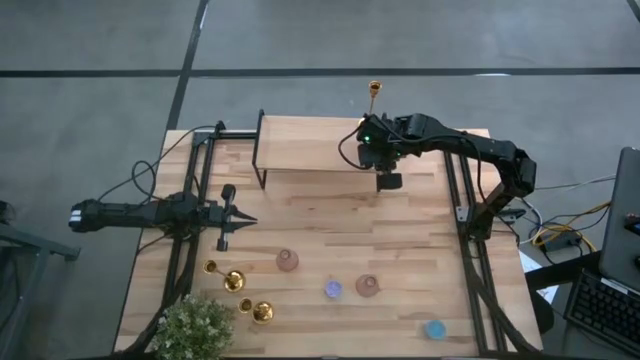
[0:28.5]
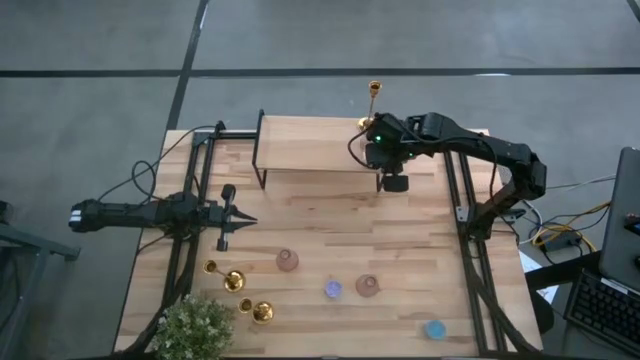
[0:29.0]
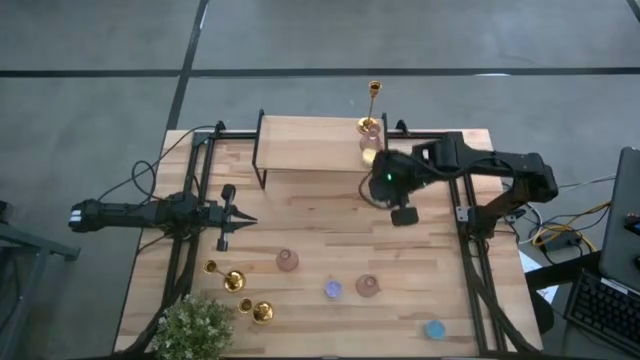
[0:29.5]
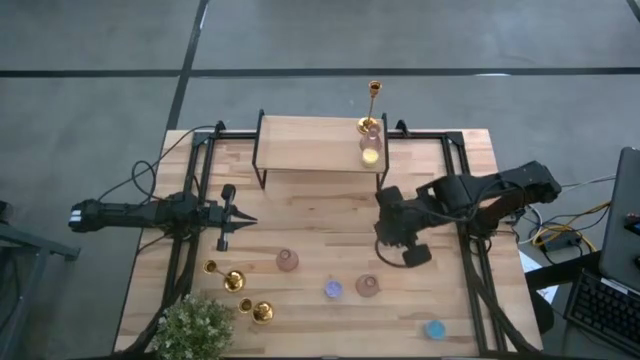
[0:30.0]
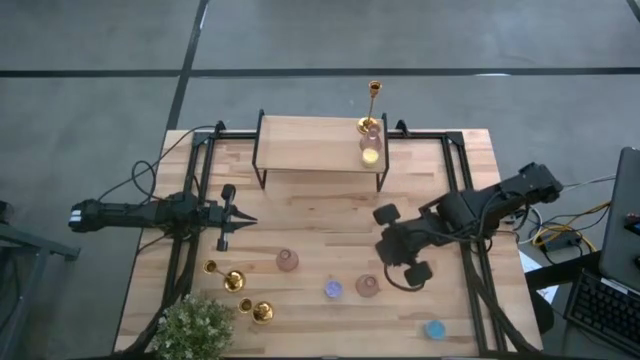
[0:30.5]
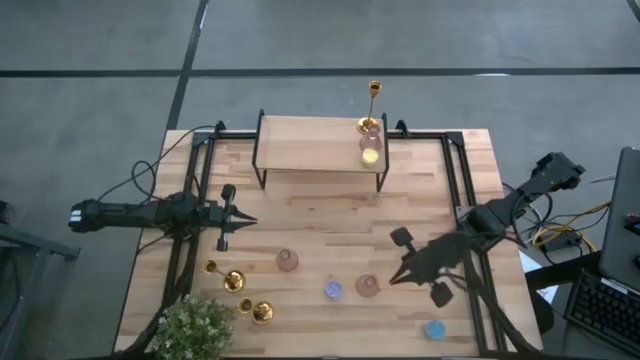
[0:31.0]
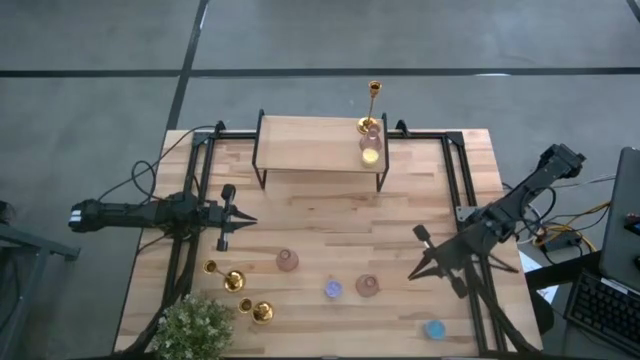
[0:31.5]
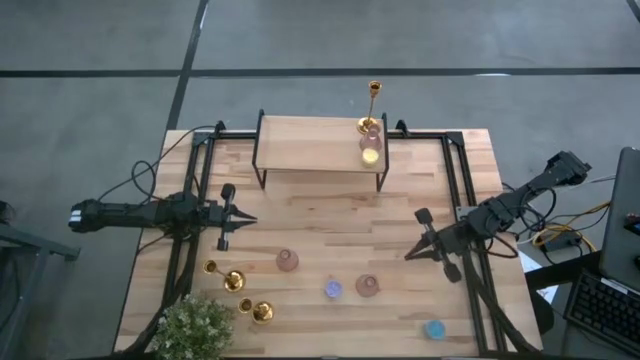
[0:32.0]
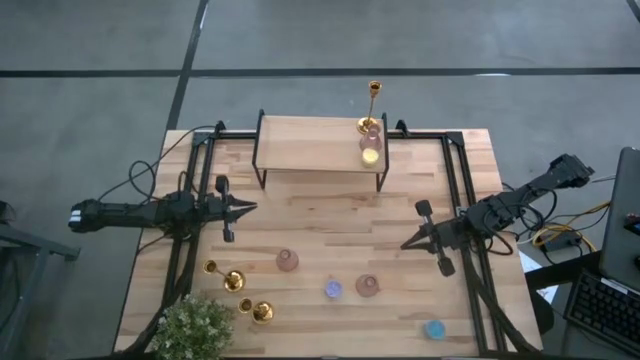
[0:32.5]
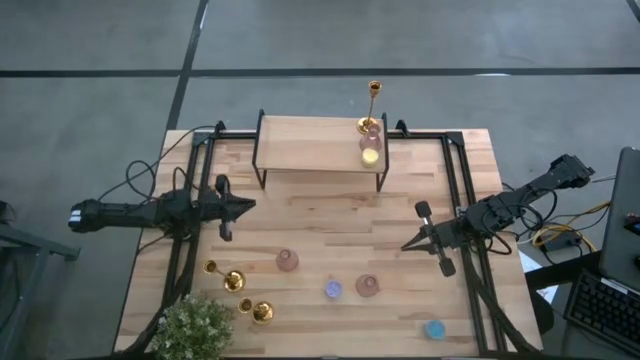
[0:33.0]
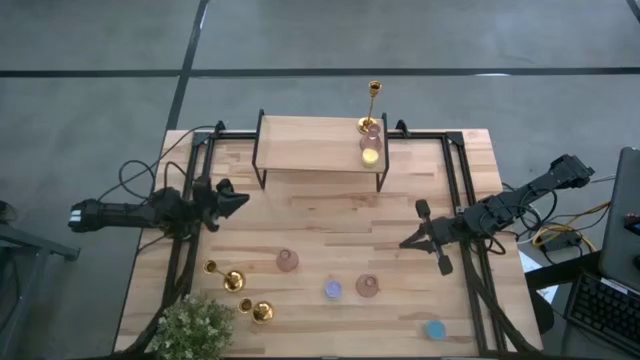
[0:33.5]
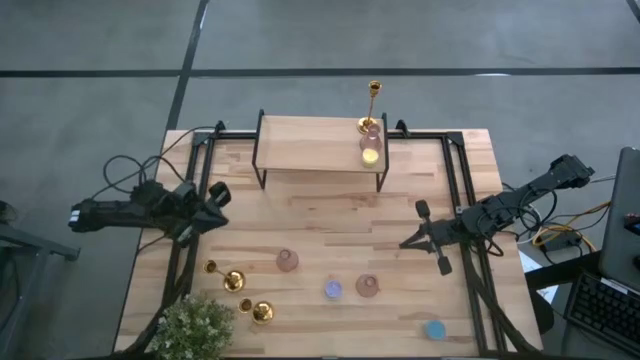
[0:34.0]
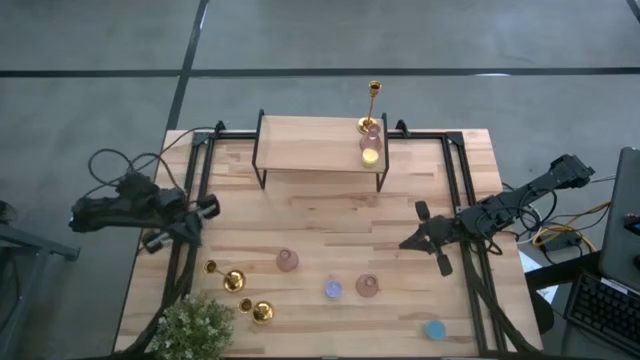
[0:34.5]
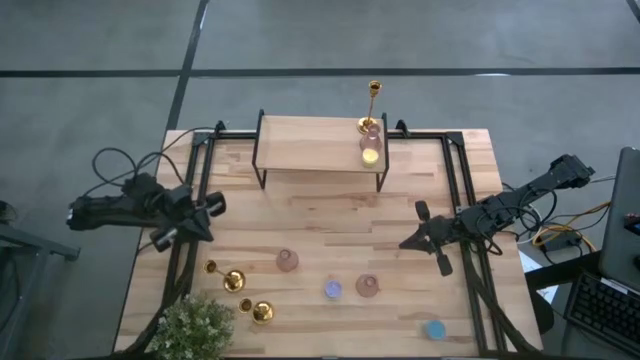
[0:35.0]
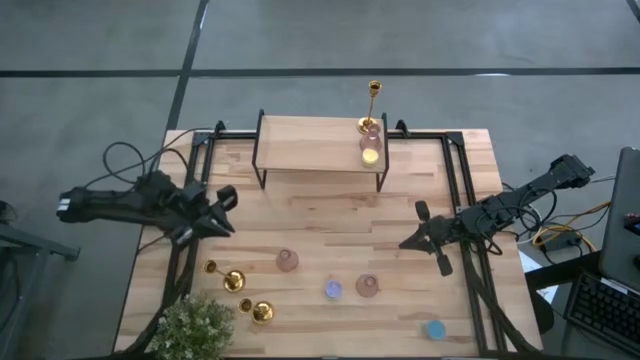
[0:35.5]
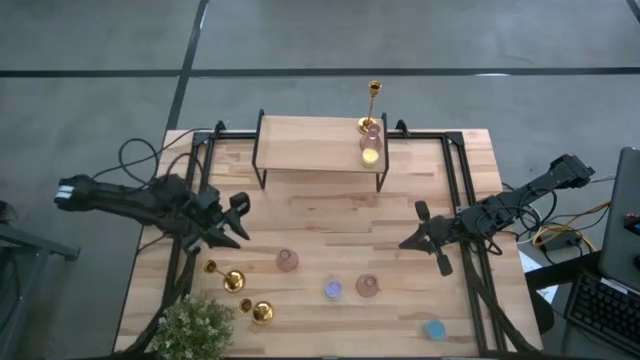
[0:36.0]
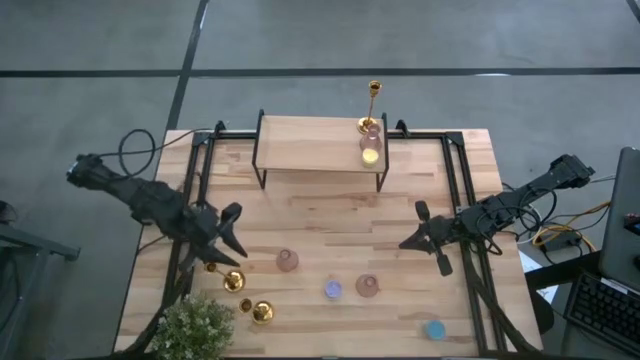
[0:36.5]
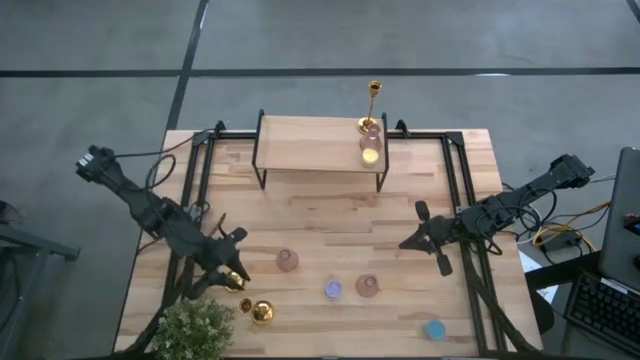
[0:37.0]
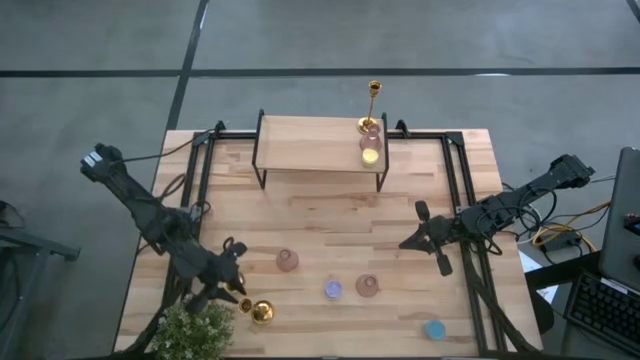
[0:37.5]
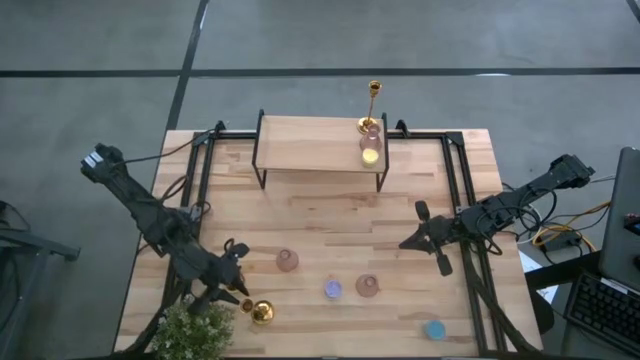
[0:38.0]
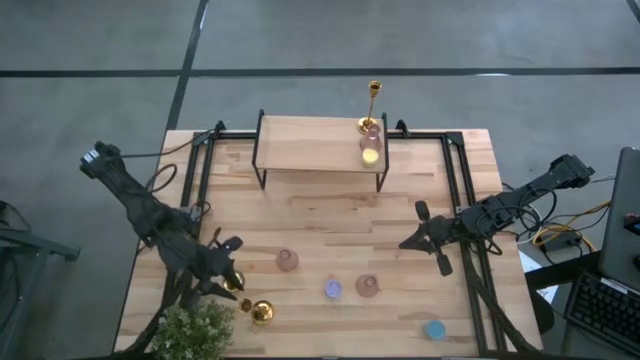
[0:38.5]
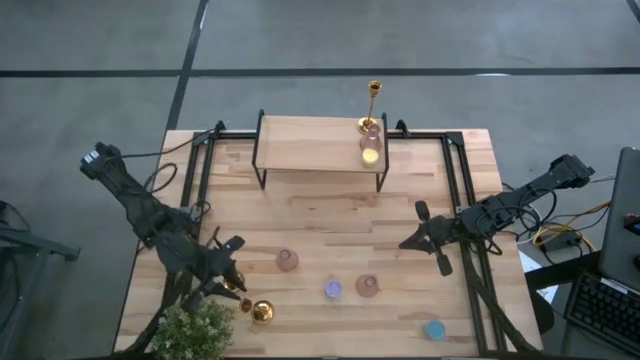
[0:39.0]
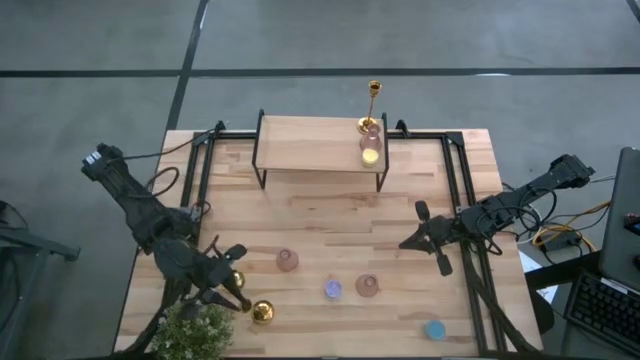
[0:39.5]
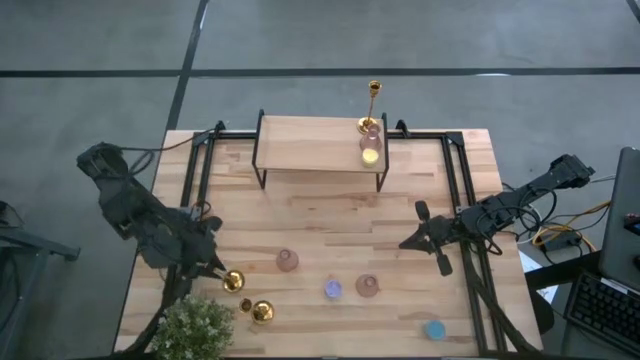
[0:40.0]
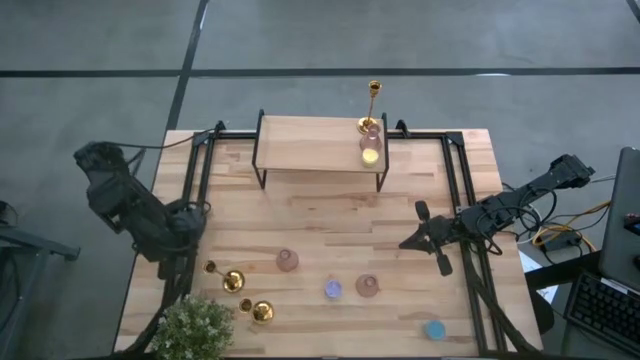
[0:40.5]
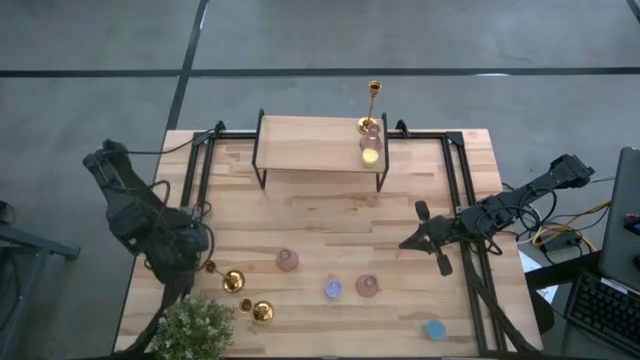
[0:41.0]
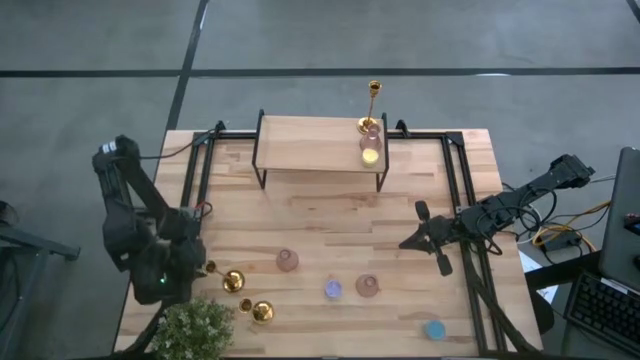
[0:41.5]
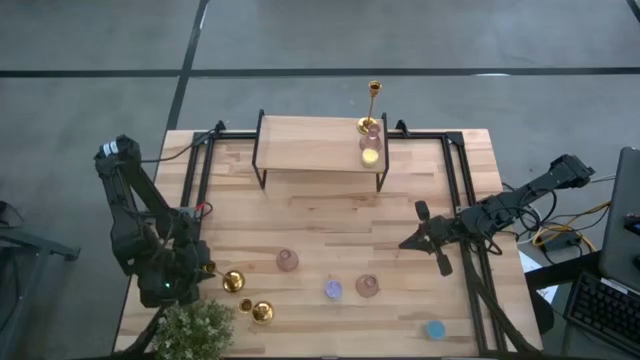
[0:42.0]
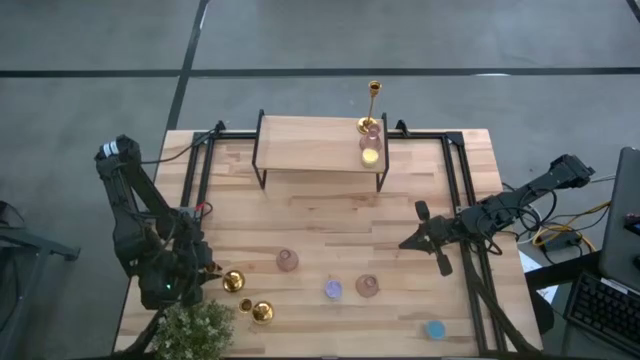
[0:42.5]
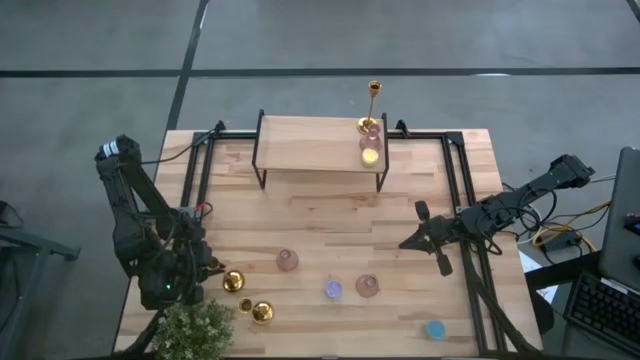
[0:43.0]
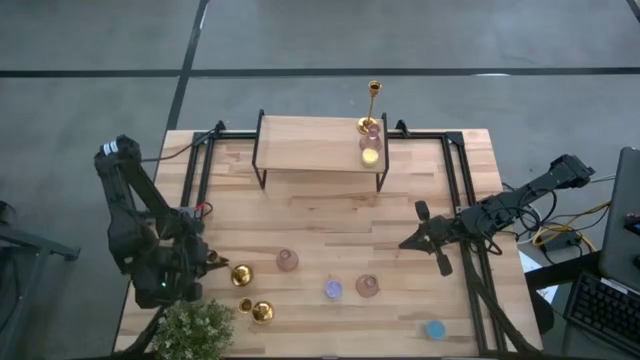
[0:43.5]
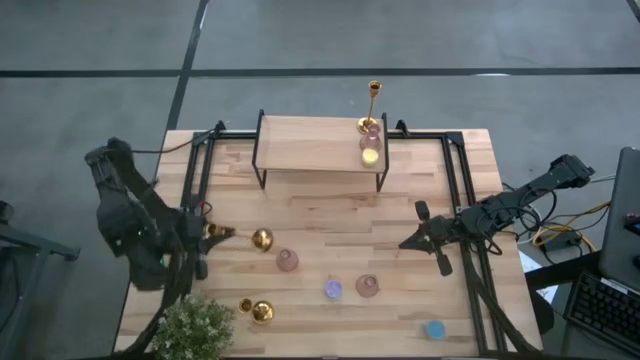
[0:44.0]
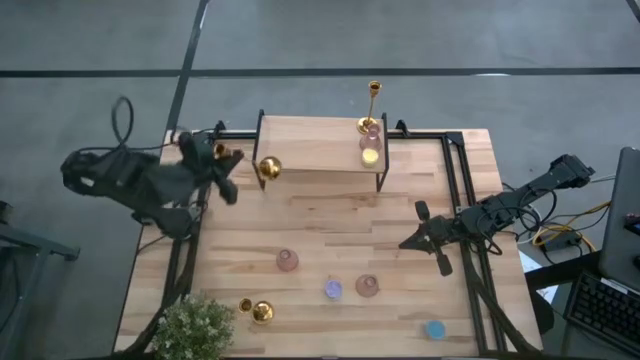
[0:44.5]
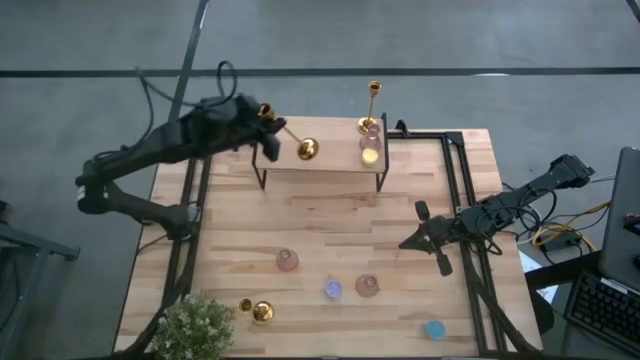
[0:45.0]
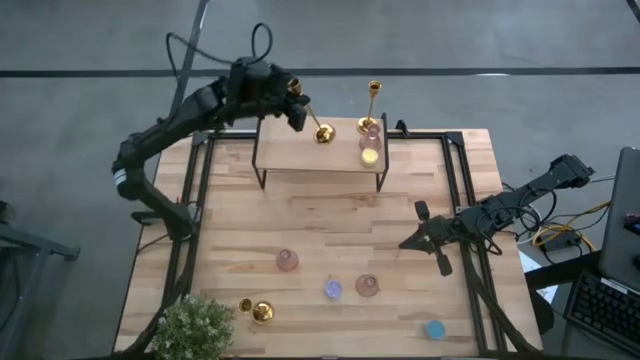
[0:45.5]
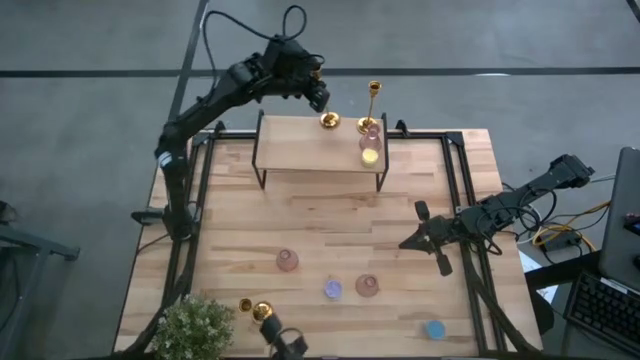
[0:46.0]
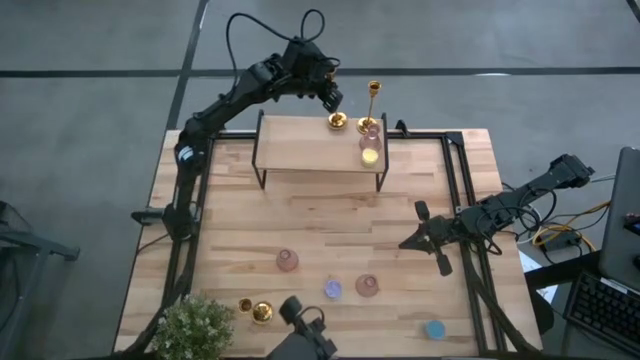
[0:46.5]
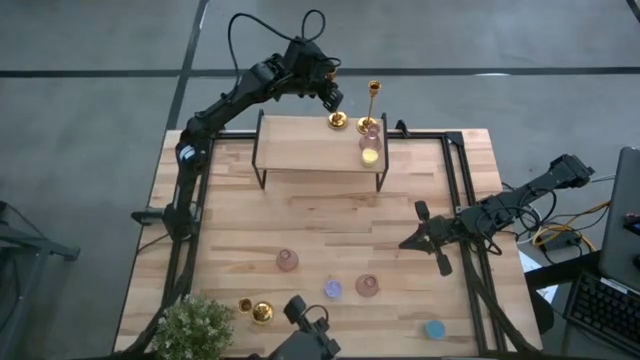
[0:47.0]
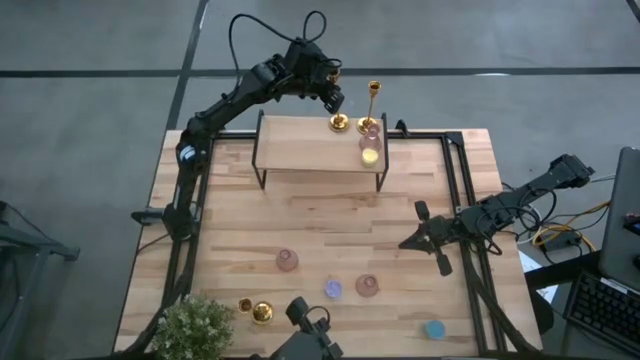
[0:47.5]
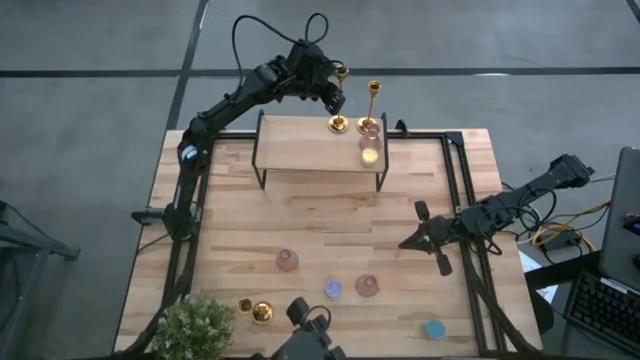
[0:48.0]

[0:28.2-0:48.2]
Task: Pick & Place candle stick holders
Put the top gold candle holder on the shelf aligned with the other gold candle holder

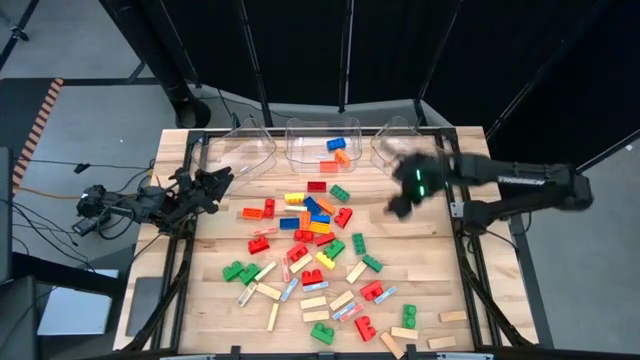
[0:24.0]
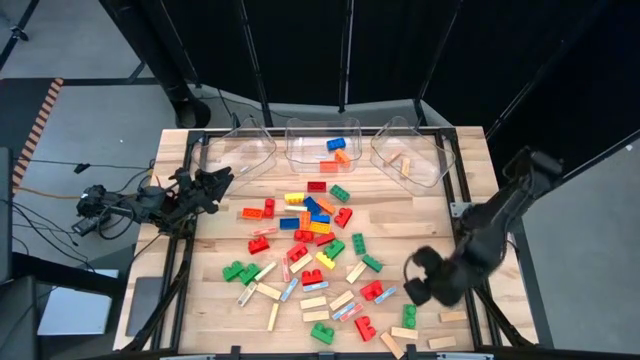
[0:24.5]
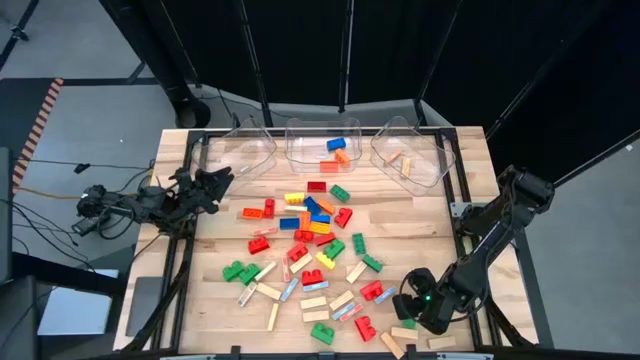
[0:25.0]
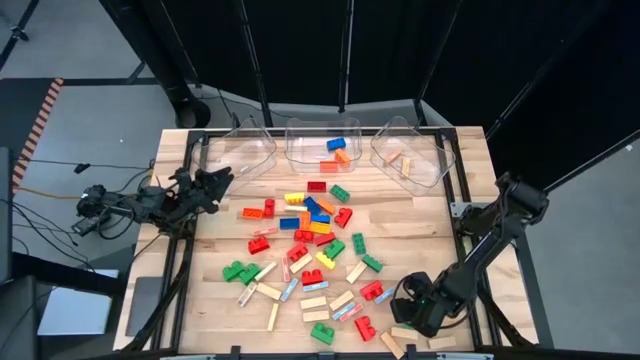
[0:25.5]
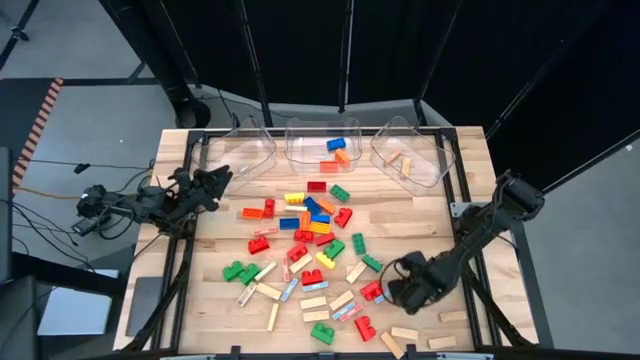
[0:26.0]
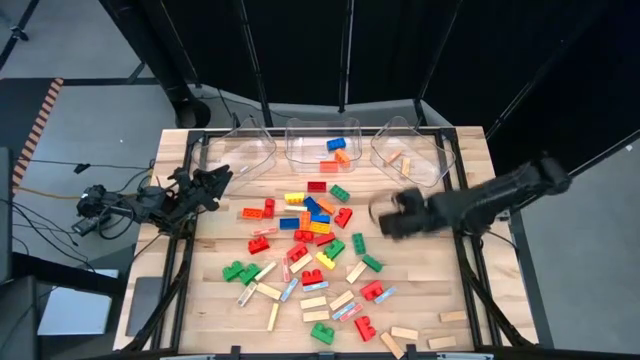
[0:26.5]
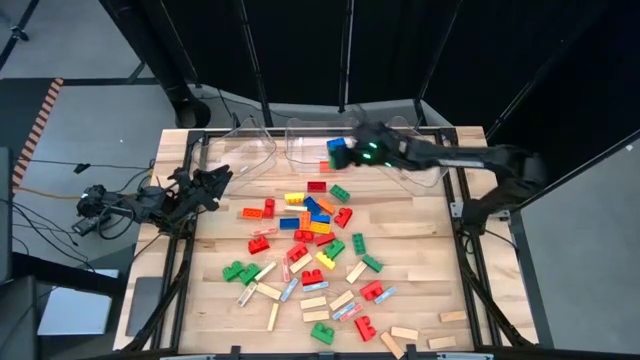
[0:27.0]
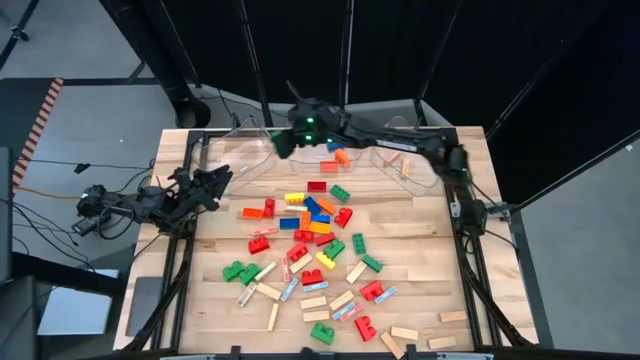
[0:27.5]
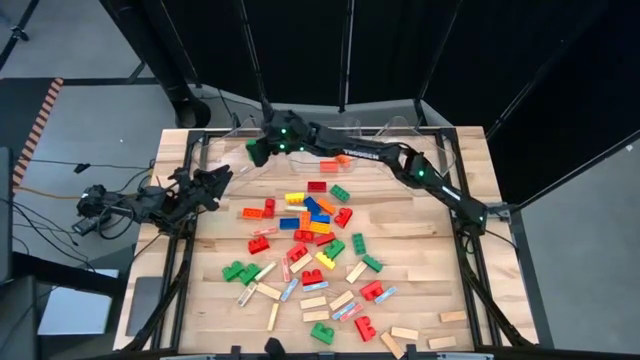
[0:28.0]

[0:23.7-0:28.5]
Task: Sort blocks by size
Put the small green game piece into the left transparent bin
